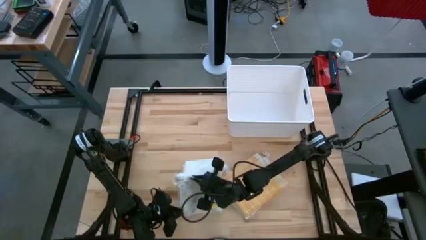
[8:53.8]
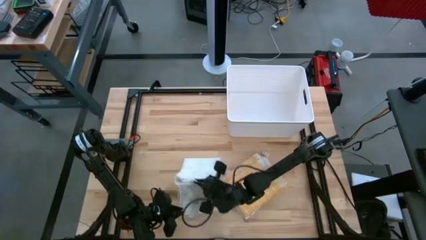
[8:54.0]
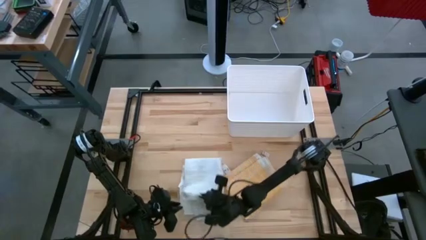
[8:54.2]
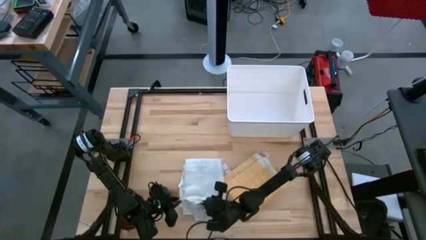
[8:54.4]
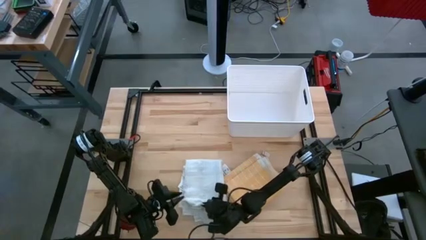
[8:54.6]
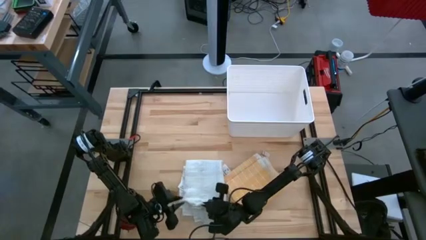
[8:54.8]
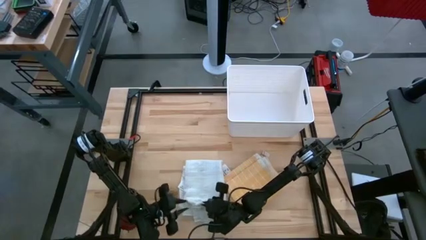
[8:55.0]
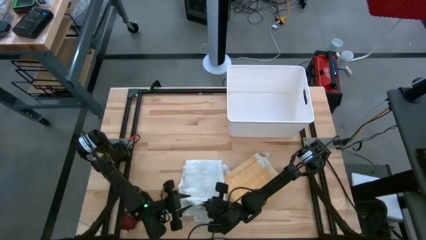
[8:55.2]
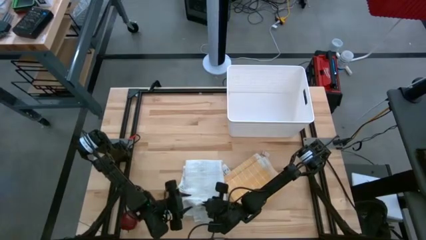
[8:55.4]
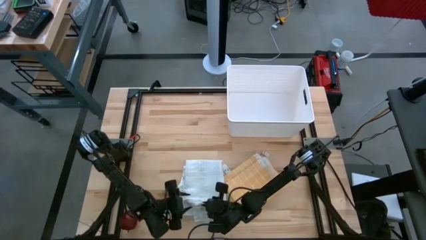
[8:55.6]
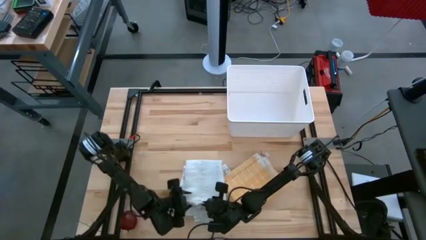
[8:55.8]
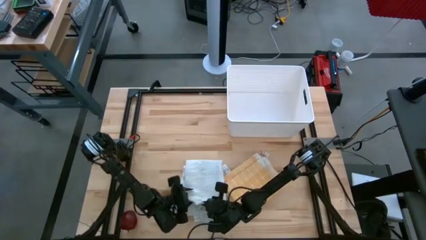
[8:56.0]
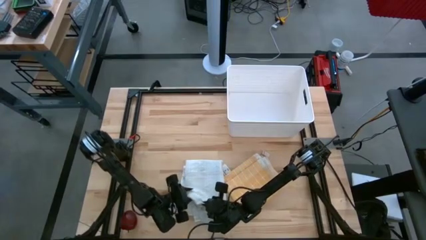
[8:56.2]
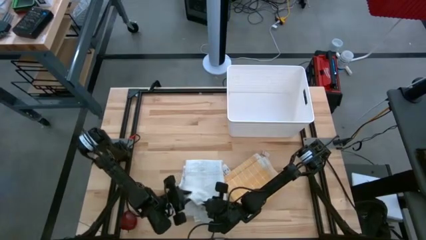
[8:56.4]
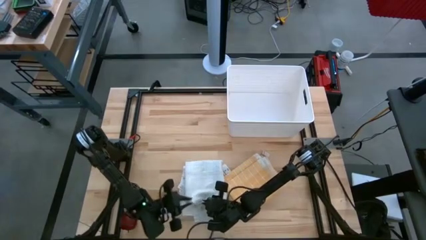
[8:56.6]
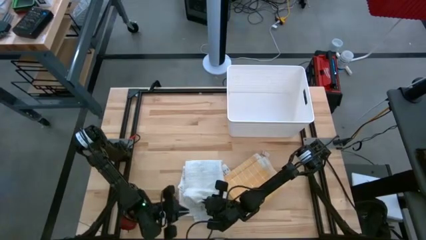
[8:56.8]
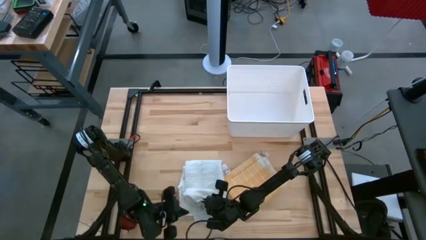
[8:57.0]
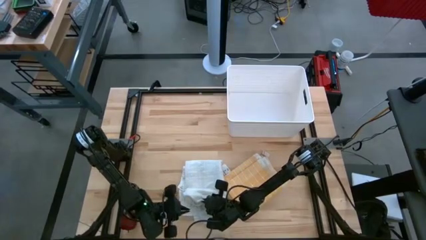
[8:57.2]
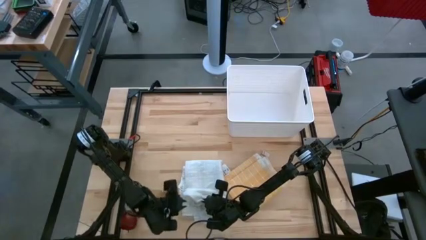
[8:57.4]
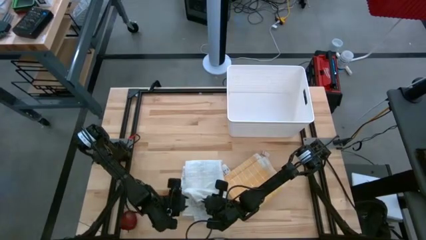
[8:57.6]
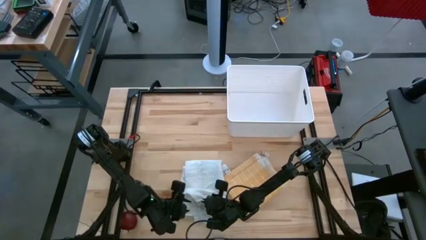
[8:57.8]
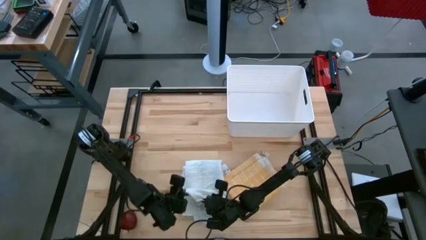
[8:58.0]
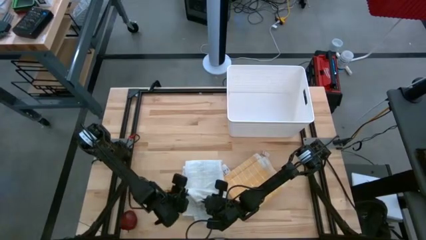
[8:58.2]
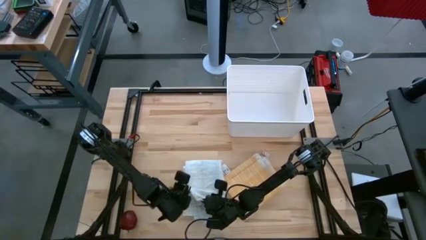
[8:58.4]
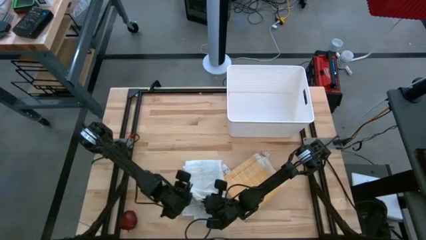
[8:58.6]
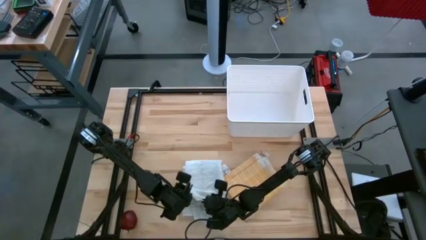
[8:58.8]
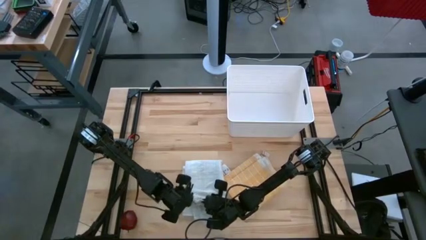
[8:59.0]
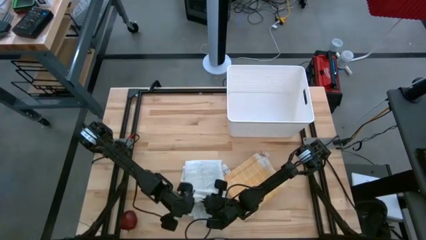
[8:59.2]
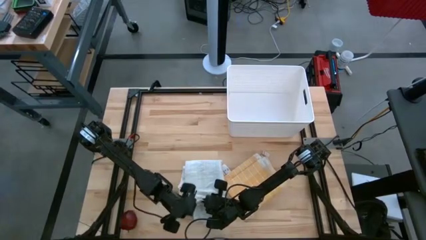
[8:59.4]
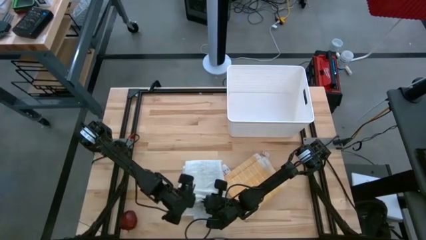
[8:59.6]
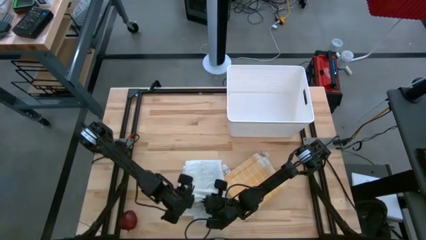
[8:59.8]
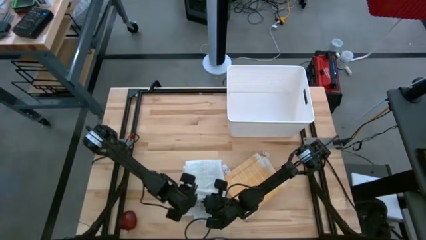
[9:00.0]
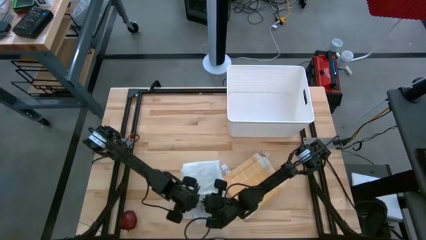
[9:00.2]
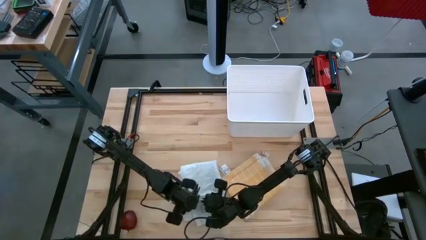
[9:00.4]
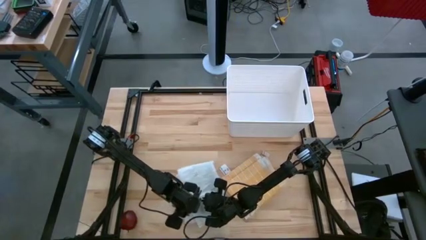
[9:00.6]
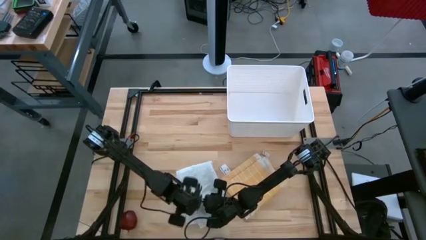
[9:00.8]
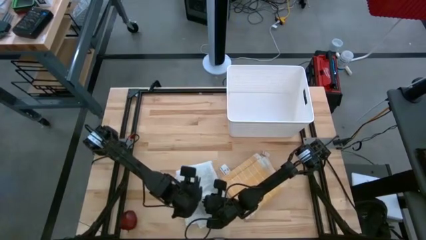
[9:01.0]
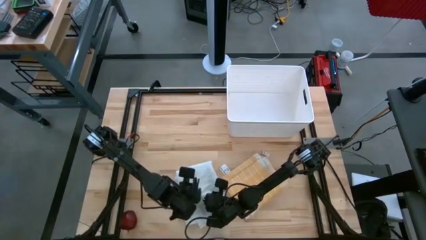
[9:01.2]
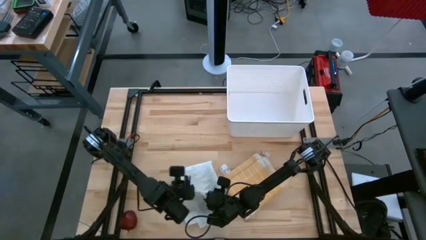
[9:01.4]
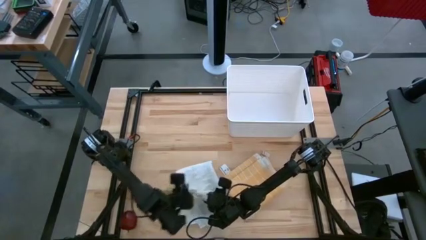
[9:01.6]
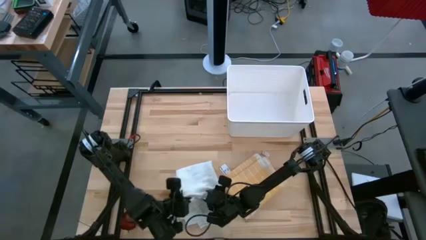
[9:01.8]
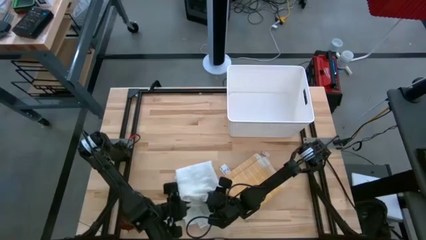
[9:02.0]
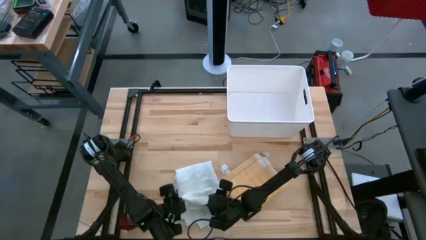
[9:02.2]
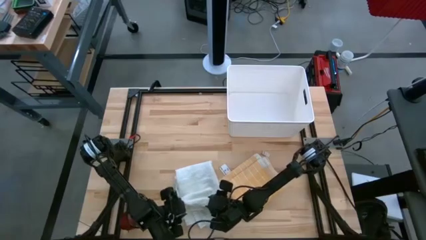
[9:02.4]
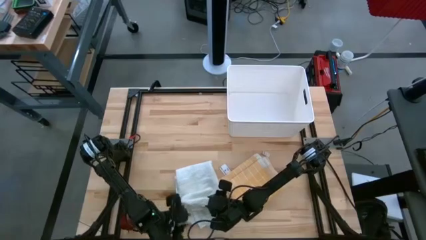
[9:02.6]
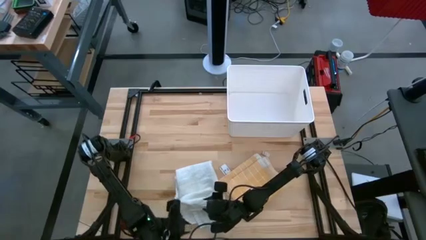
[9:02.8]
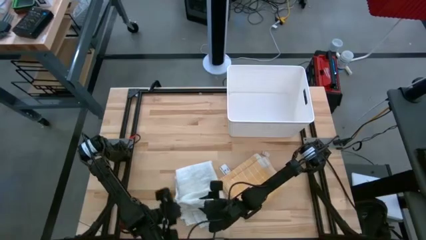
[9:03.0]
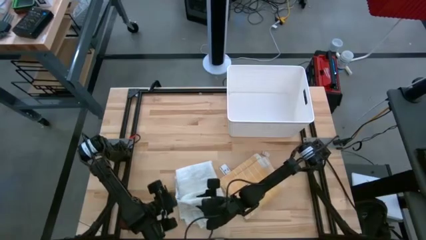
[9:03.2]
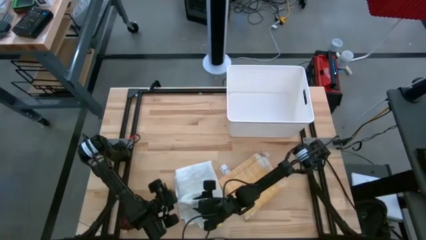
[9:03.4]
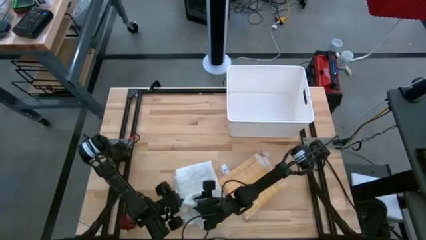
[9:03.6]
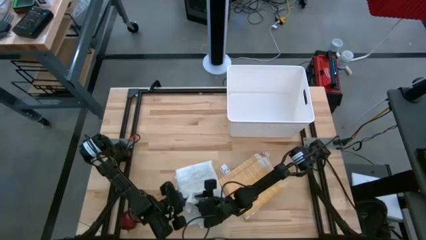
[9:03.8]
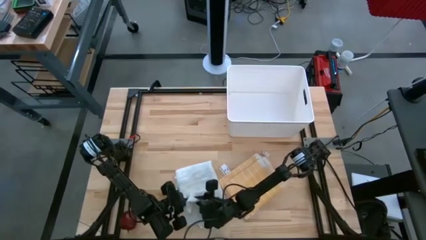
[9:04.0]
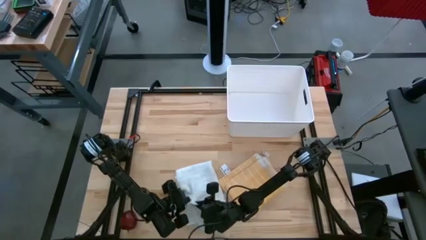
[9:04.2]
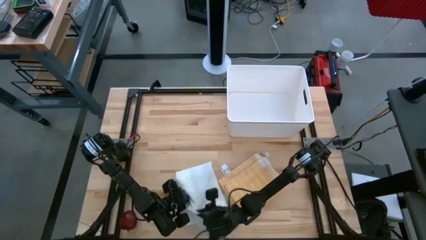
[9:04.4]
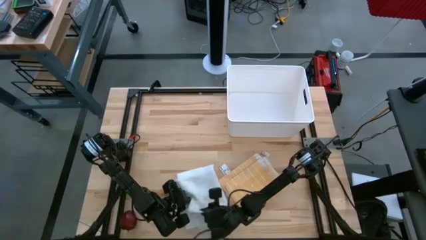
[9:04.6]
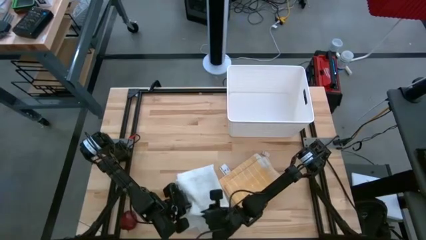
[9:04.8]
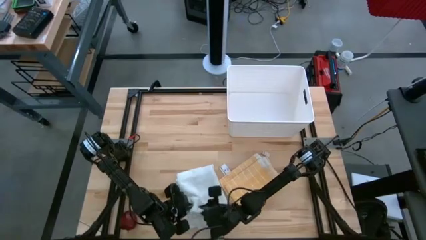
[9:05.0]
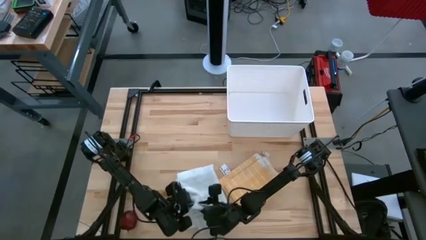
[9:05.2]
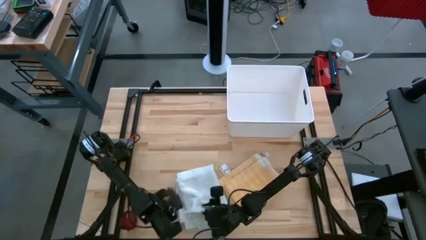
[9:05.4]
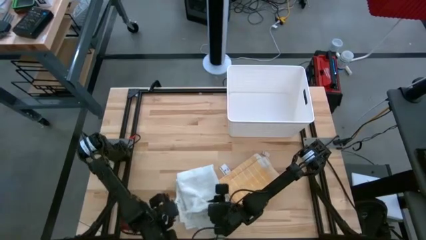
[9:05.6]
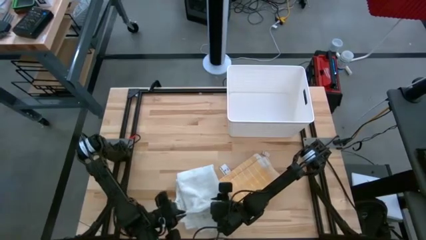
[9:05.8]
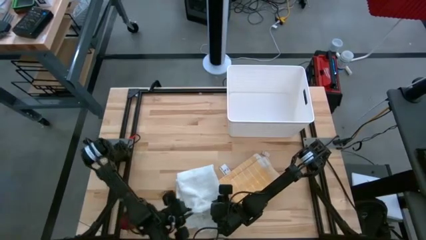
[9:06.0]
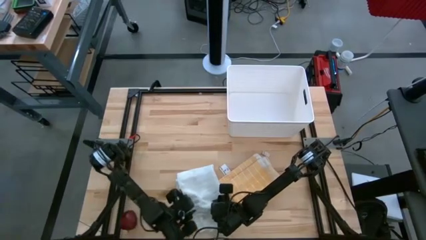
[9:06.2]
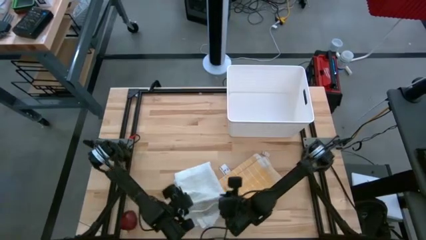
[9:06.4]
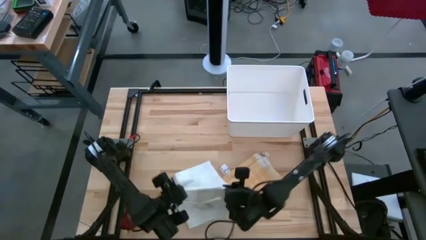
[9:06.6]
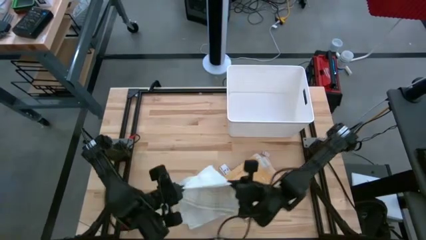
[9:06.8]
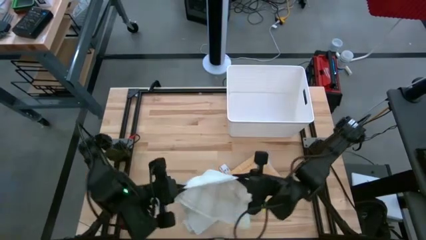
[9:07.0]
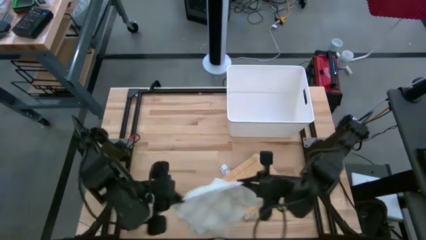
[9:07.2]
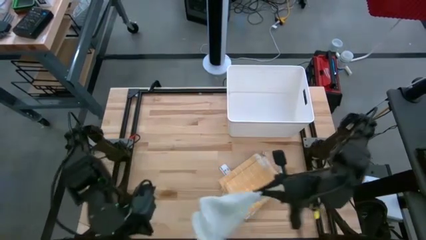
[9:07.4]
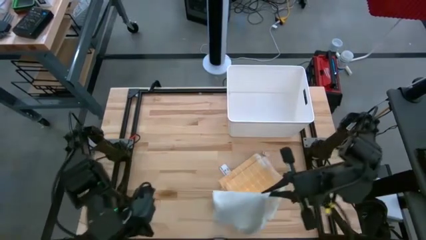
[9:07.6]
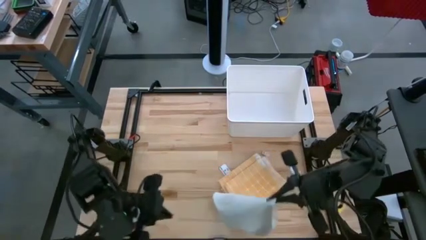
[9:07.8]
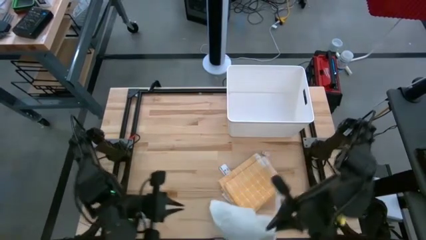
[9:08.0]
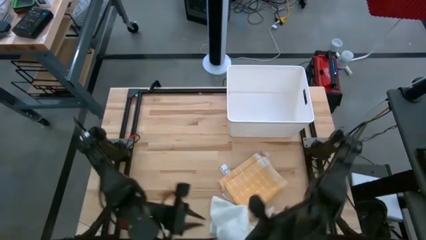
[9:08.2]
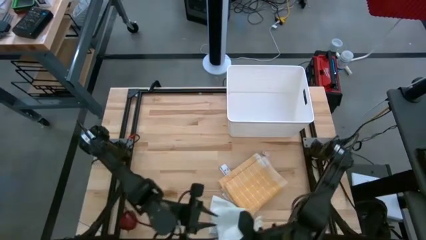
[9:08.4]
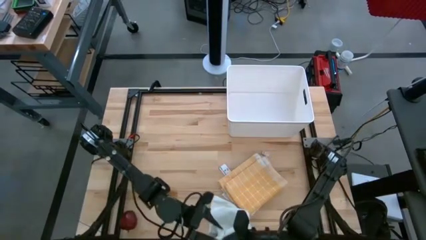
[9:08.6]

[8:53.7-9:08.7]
Task: Fold towel
Fold the white checkered towel

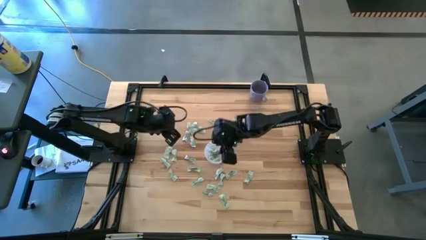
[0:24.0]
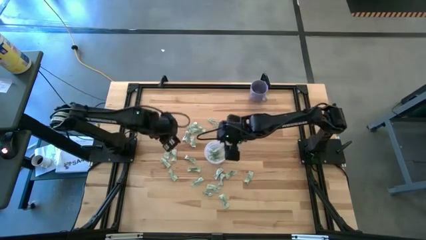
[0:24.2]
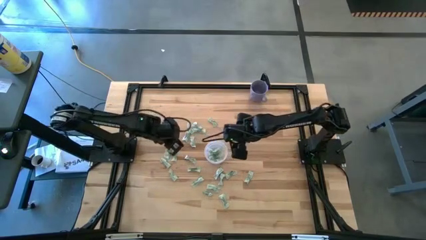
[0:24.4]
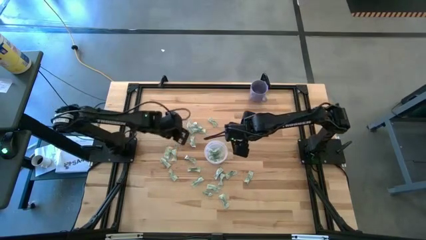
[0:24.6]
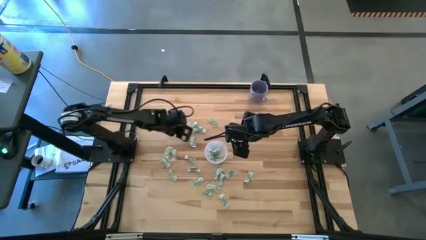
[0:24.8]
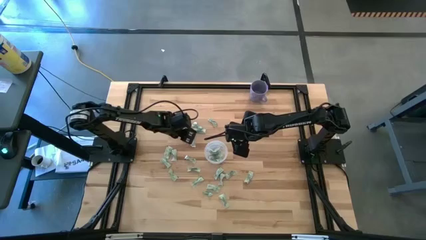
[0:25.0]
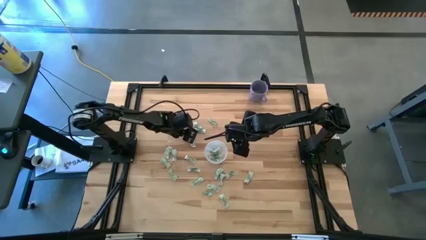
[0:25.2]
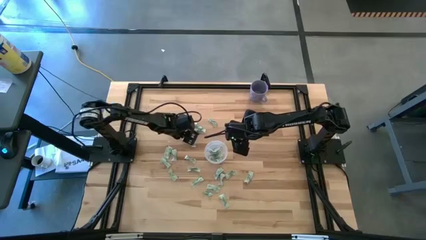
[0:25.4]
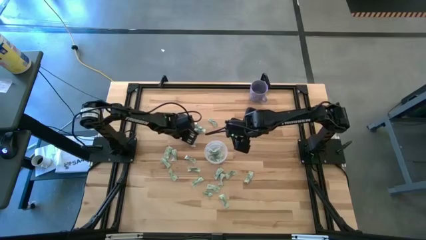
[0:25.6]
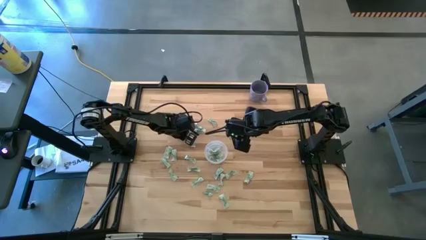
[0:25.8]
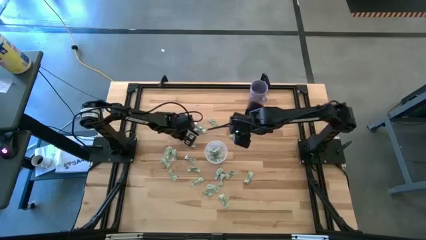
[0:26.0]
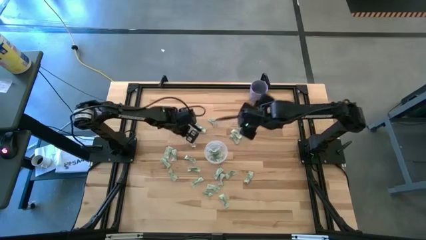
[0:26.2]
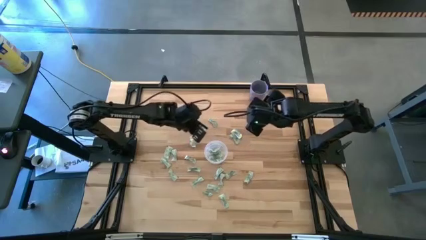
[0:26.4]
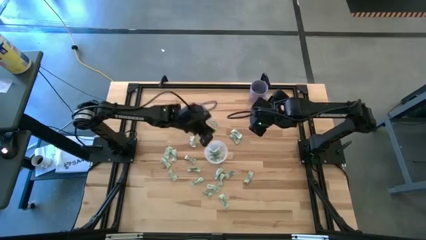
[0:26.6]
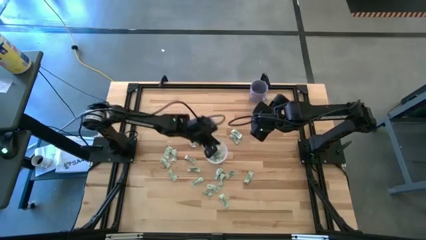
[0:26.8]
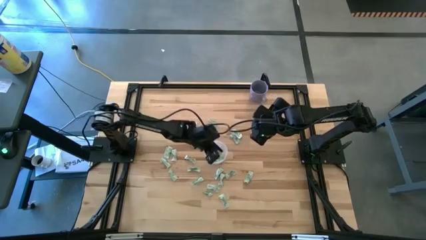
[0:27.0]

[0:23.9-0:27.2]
Task: Pick and place Stevia / Truvia into bins
Put the green stevia packet into the transparent container
